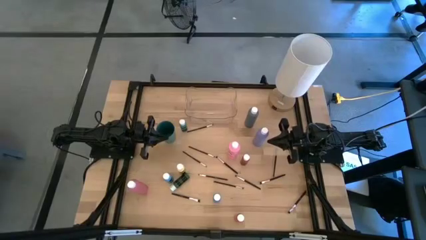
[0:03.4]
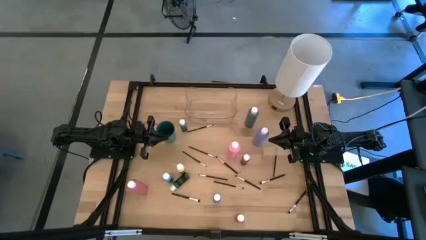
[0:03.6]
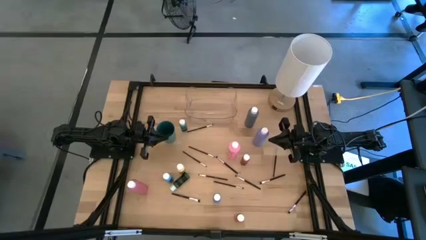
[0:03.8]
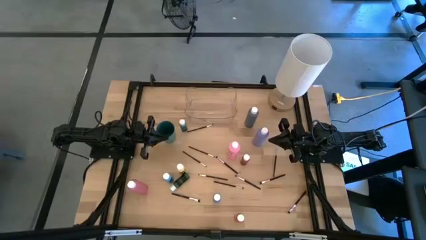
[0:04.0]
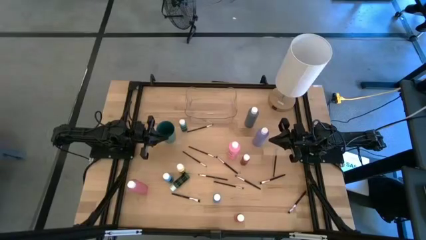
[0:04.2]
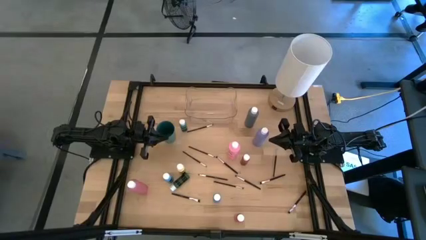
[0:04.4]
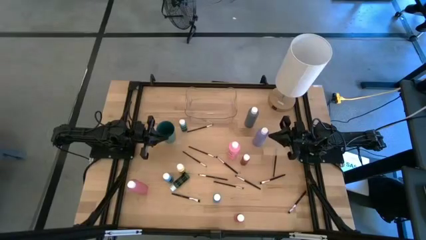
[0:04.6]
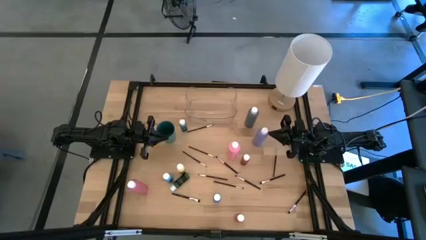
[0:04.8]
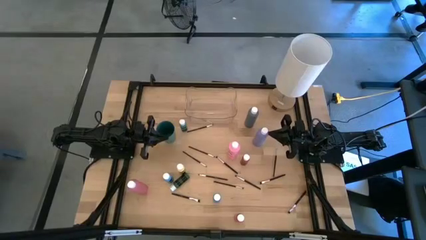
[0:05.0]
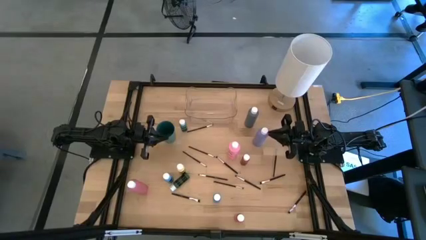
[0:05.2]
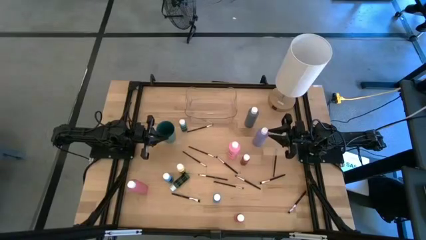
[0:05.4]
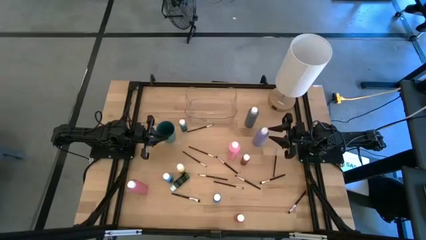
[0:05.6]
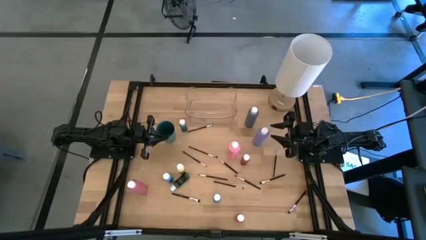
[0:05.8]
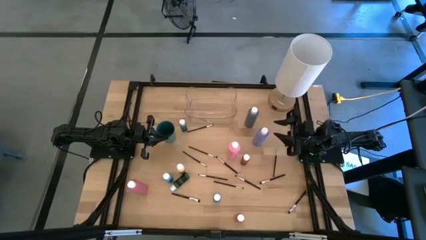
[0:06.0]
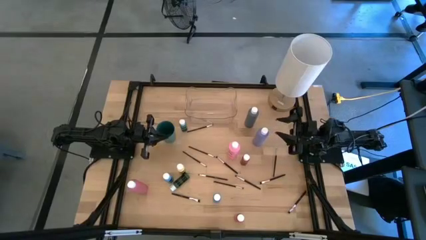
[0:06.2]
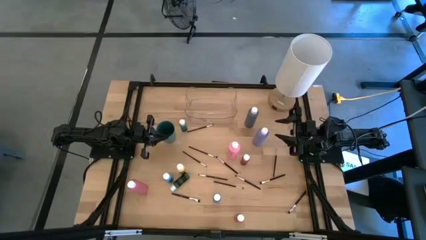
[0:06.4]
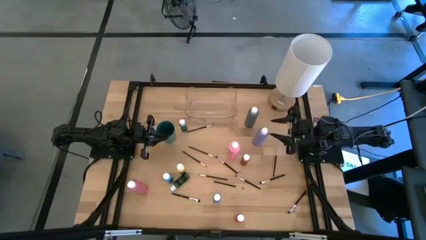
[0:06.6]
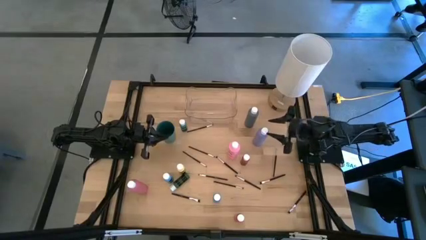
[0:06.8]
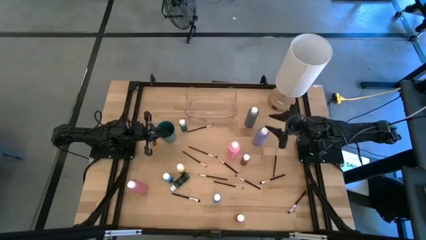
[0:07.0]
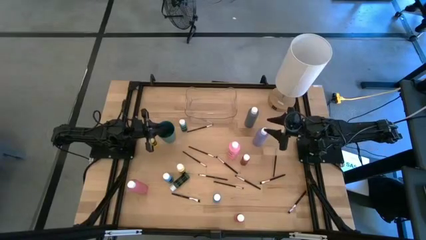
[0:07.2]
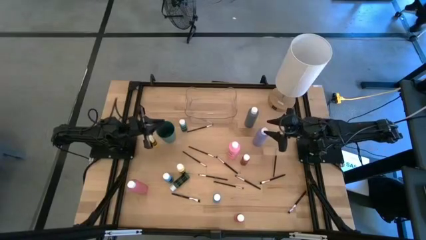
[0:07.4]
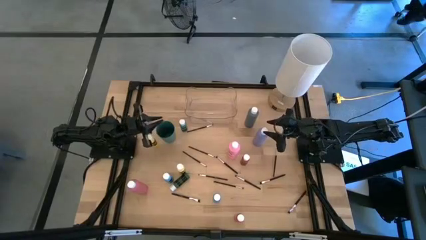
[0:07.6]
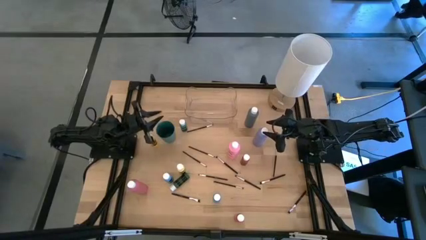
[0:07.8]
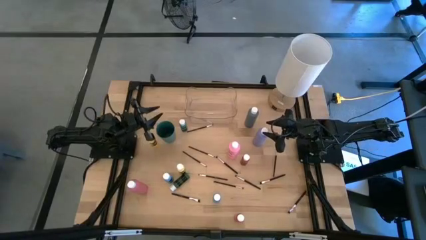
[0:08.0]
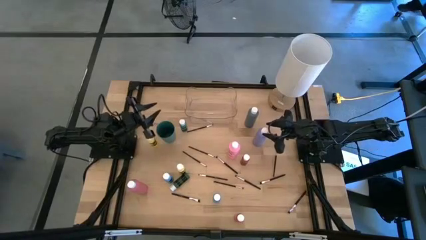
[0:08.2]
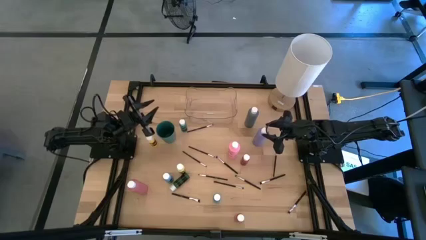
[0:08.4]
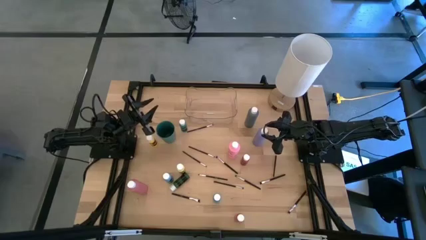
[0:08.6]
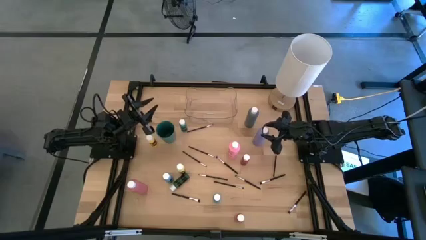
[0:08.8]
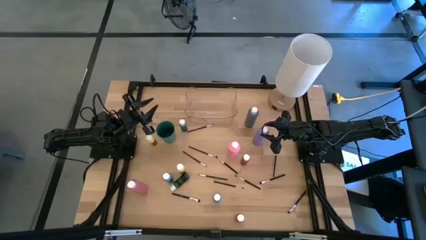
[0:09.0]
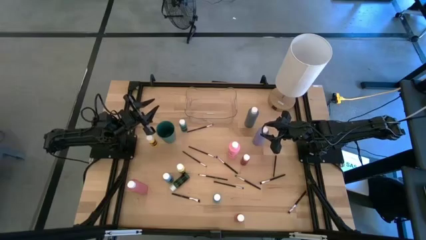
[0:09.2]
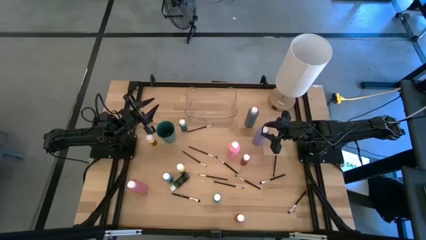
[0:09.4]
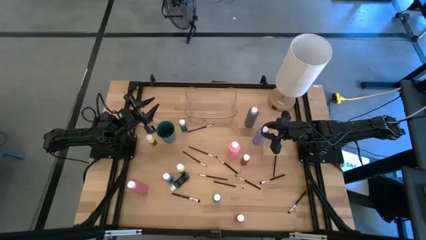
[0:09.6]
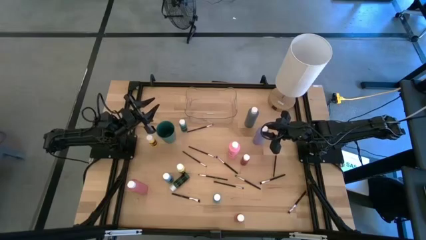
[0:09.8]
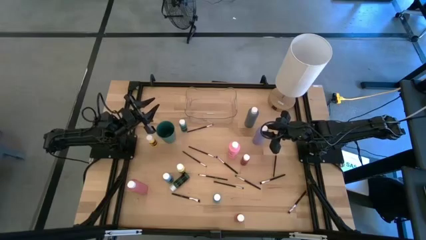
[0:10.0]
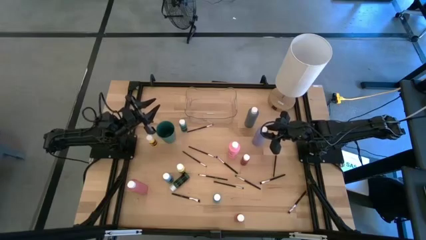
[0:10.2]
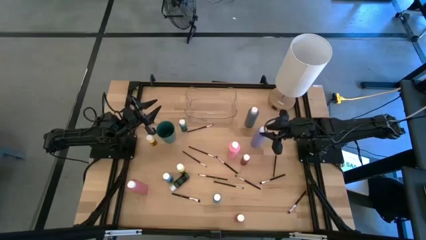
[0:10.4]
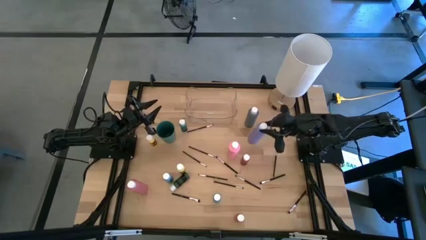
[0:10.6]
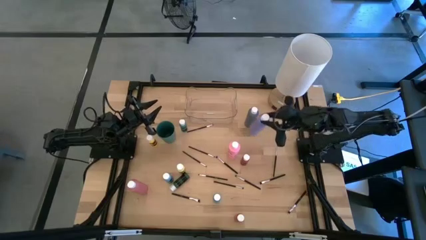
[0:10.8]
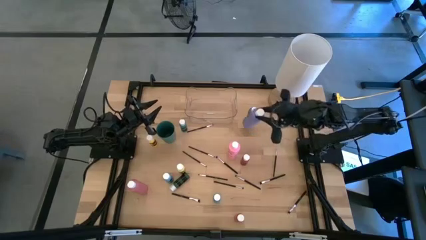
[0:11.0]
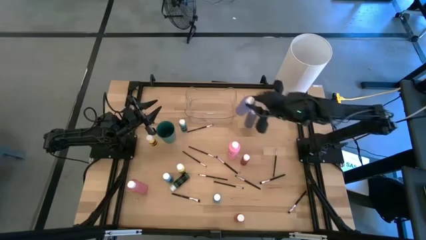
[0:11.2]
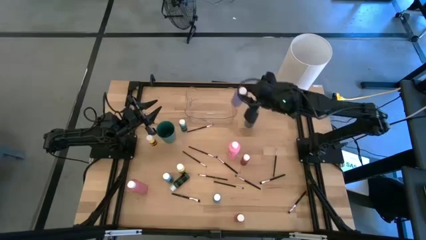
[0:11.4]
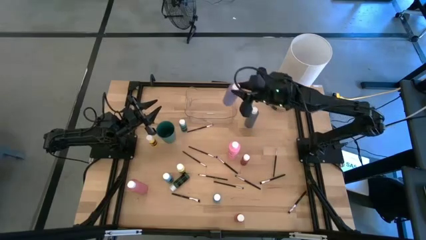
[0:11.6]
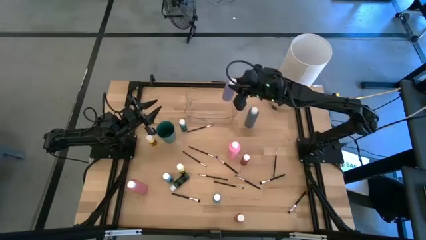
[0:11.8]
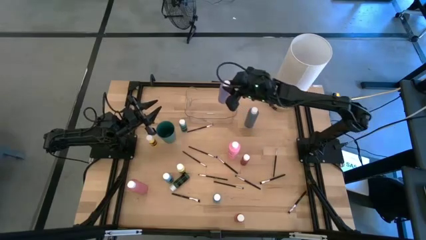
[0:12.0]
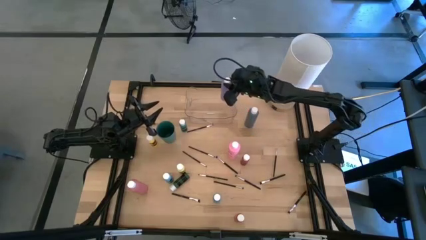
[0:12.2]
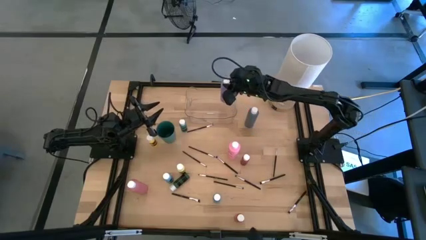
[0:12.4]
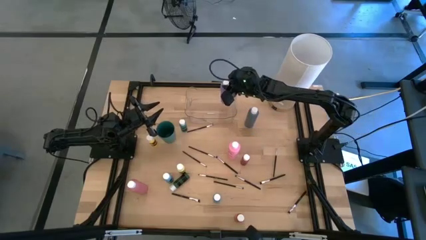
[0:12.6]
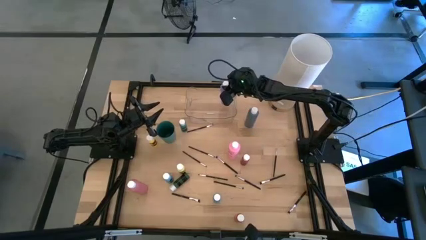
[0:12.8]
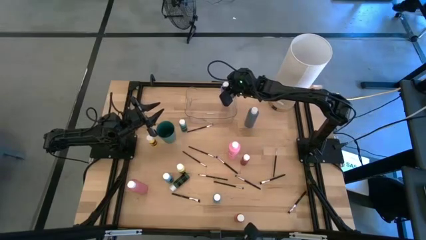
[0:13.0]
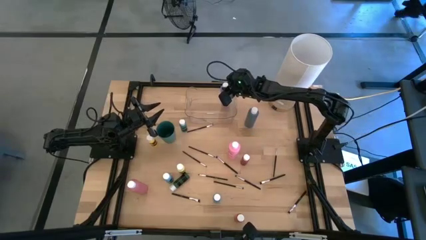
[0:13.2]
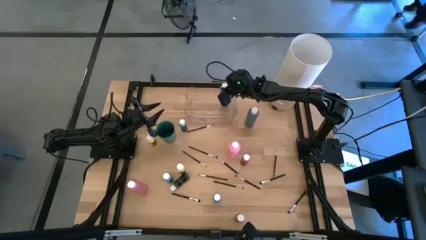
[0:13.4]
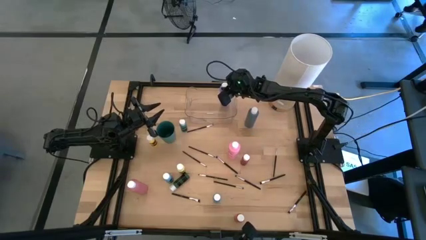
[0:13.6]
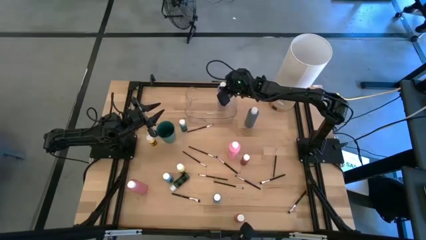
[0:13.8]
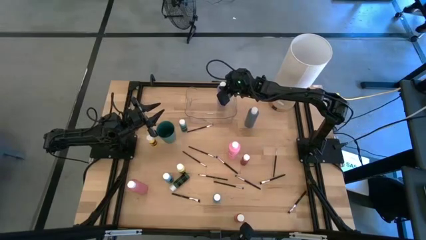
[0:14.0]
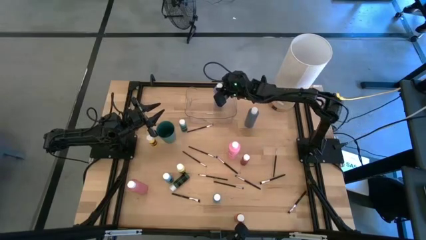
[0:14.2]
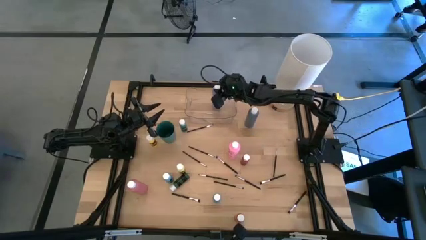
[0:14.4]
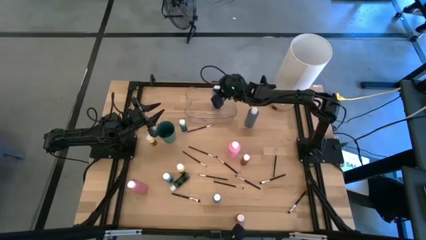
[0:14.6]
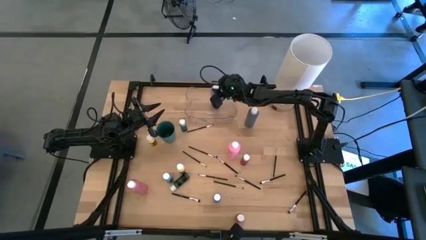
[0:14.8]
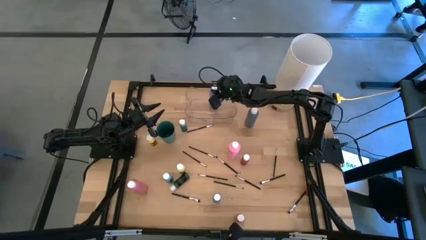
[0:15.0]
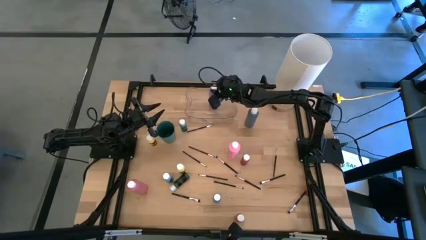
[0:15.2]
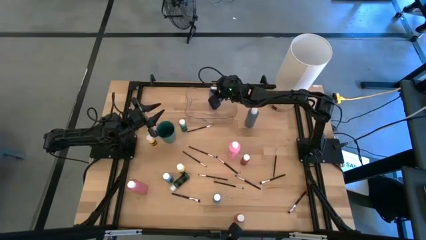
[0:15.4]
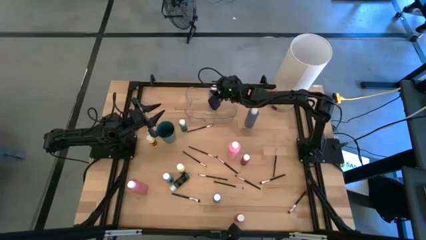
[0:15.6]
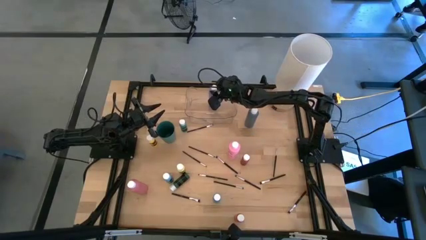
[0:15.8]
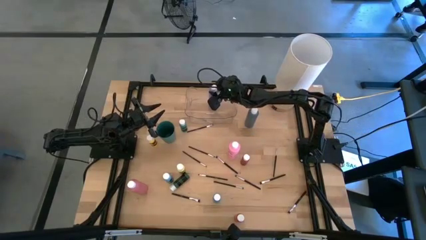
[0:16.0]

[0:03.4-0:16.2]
Task: Pick & Place Paint Supplies
Put the purple paint bottle into the transparent bin
